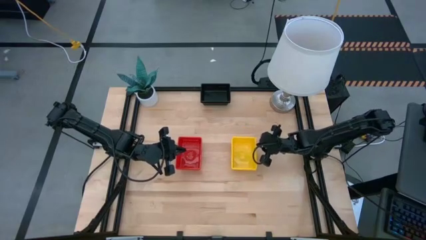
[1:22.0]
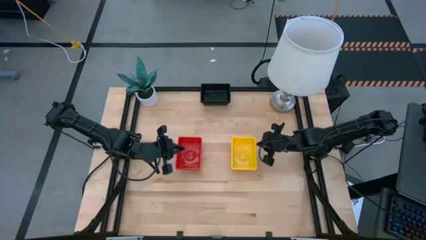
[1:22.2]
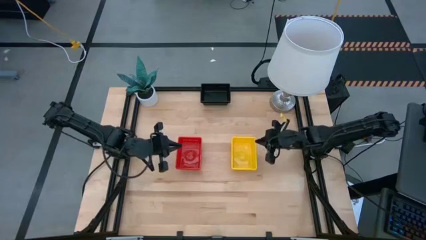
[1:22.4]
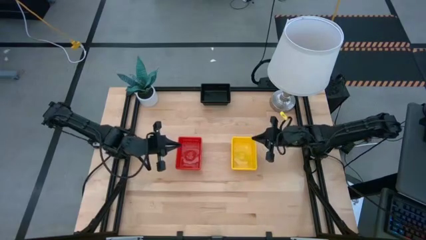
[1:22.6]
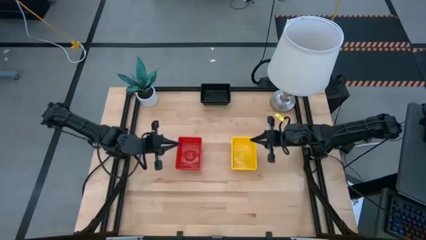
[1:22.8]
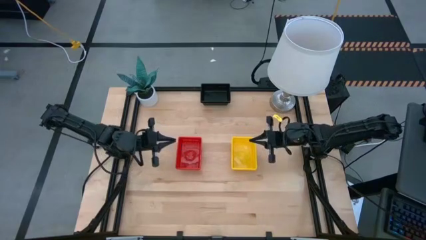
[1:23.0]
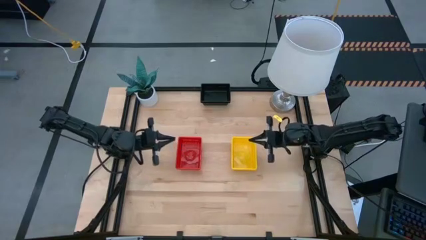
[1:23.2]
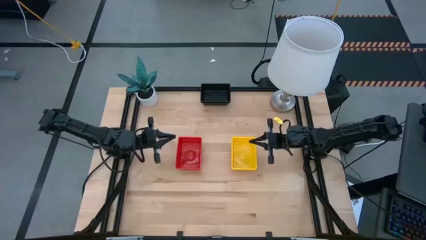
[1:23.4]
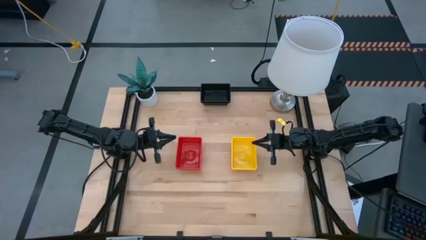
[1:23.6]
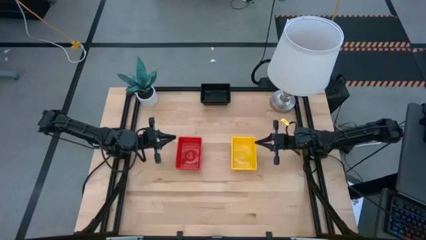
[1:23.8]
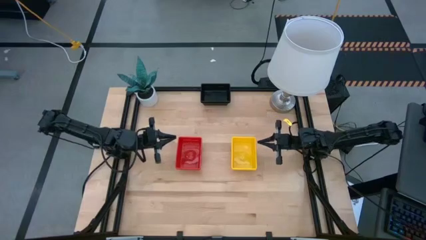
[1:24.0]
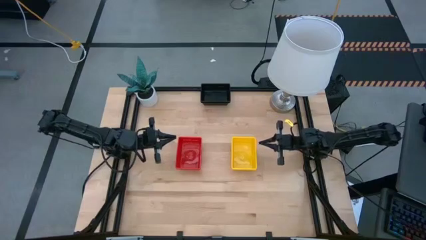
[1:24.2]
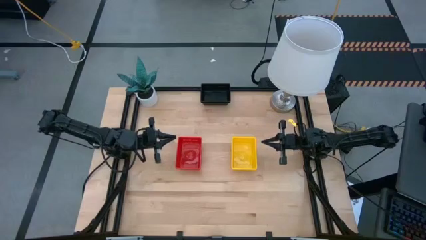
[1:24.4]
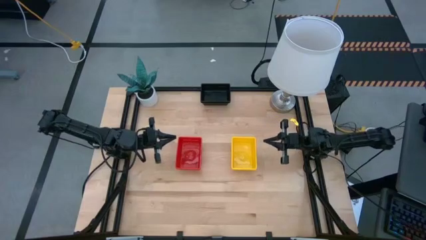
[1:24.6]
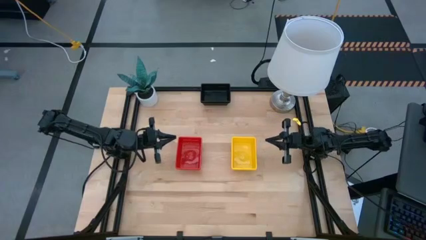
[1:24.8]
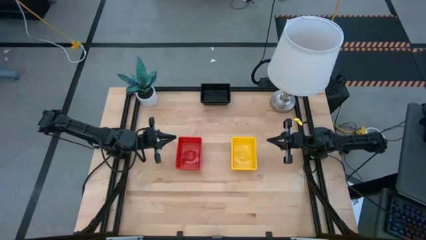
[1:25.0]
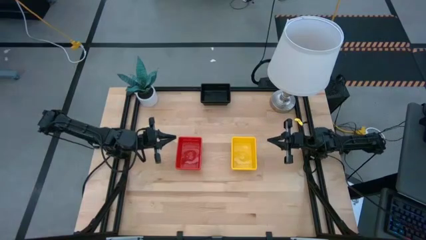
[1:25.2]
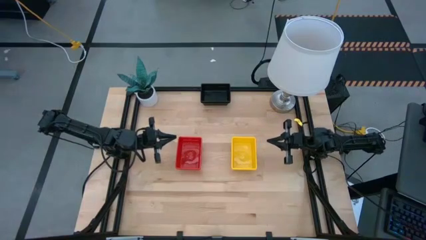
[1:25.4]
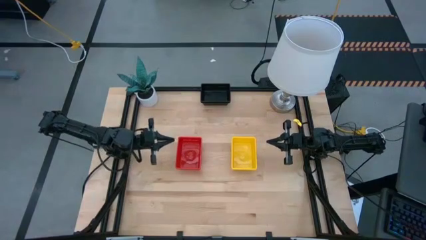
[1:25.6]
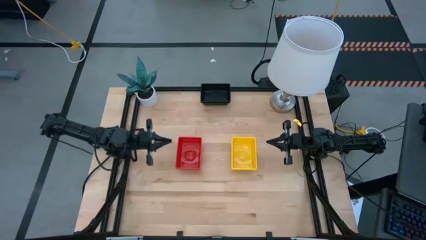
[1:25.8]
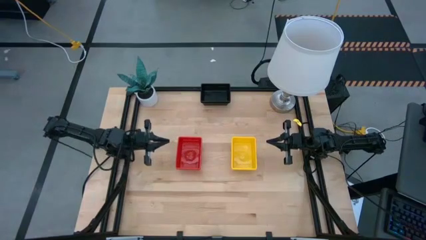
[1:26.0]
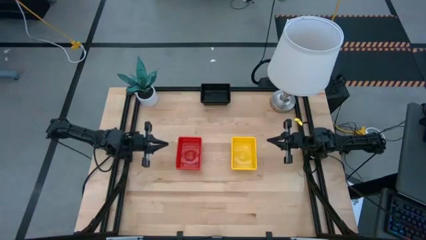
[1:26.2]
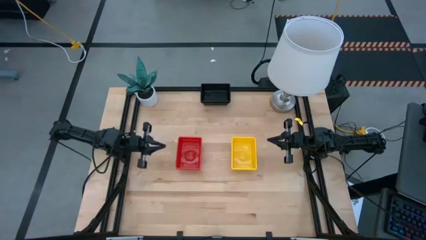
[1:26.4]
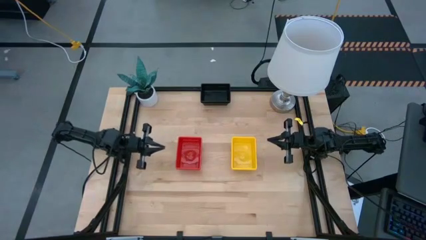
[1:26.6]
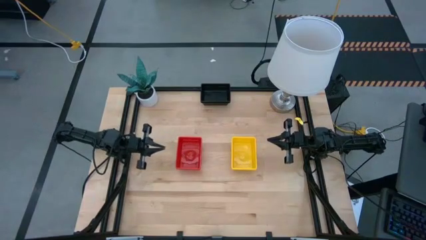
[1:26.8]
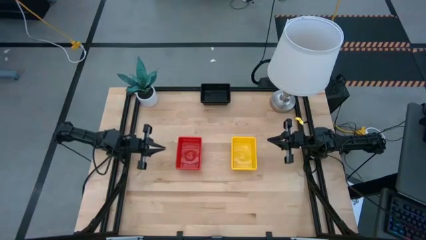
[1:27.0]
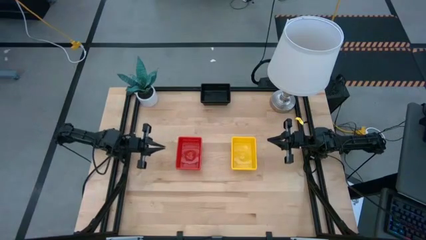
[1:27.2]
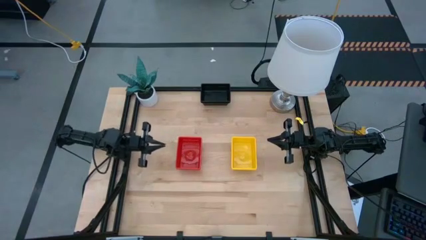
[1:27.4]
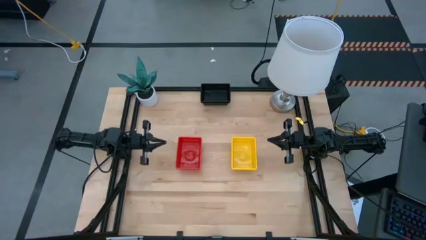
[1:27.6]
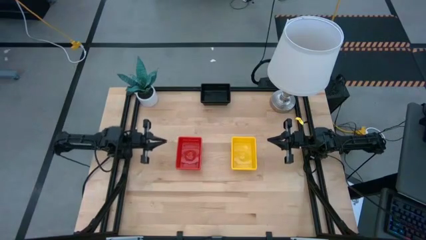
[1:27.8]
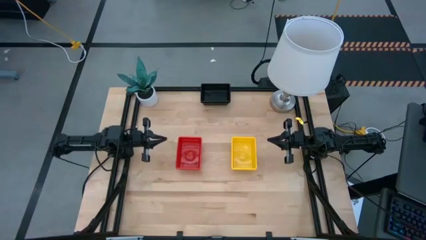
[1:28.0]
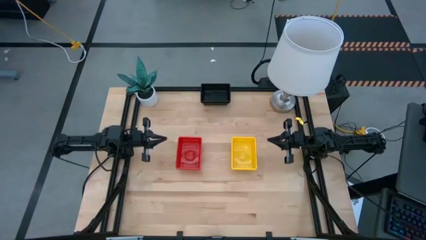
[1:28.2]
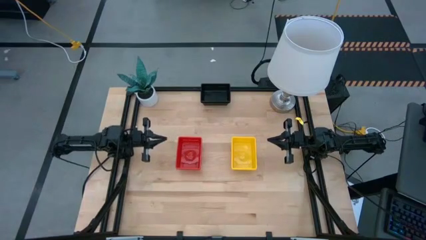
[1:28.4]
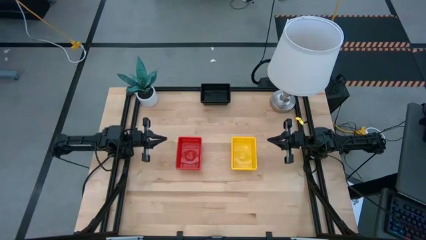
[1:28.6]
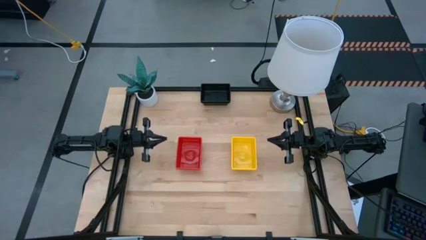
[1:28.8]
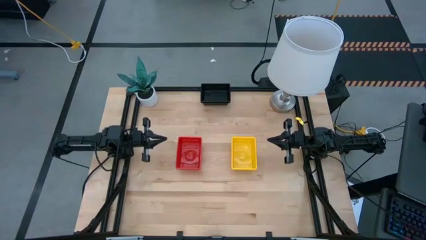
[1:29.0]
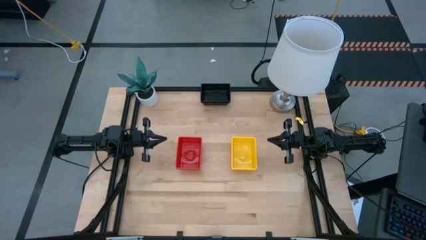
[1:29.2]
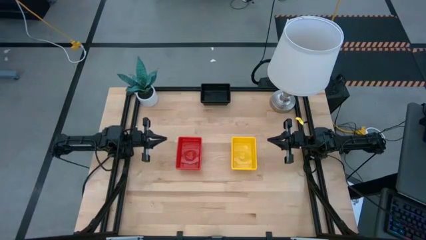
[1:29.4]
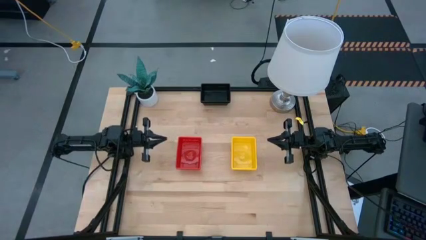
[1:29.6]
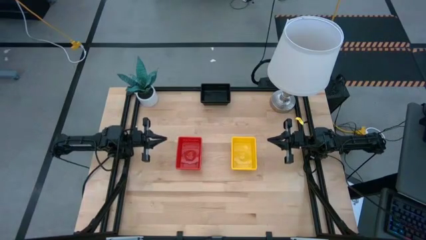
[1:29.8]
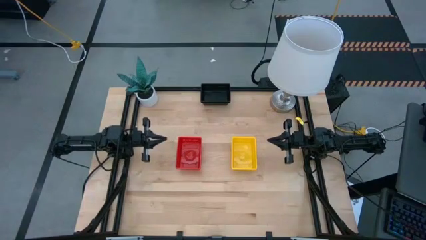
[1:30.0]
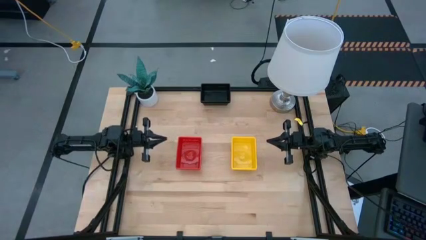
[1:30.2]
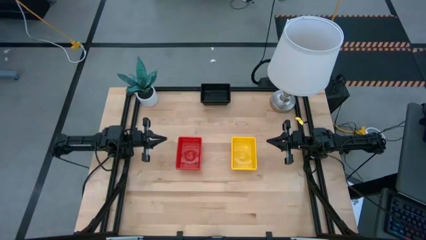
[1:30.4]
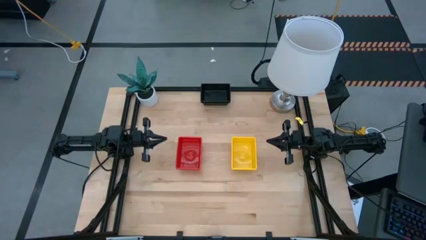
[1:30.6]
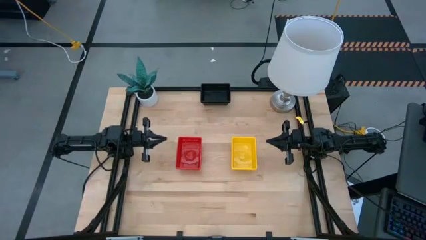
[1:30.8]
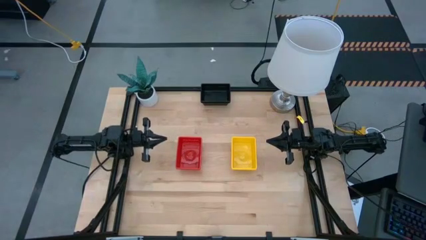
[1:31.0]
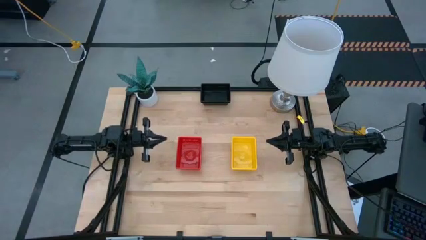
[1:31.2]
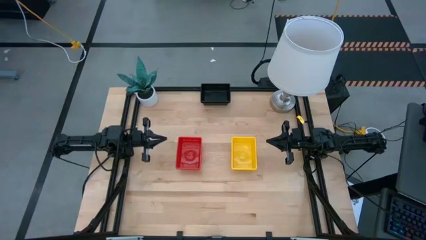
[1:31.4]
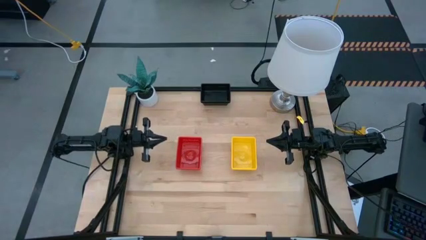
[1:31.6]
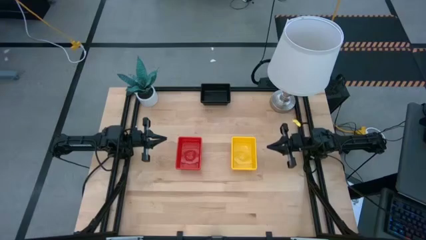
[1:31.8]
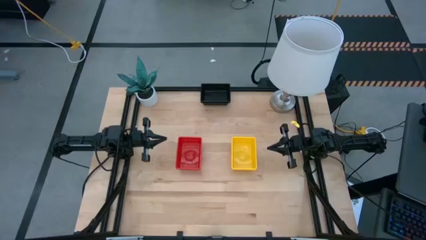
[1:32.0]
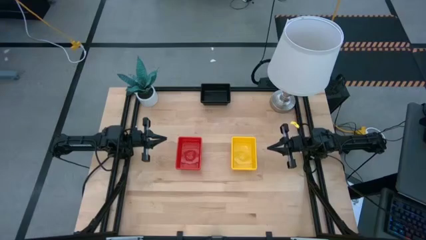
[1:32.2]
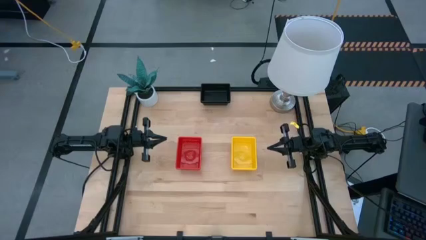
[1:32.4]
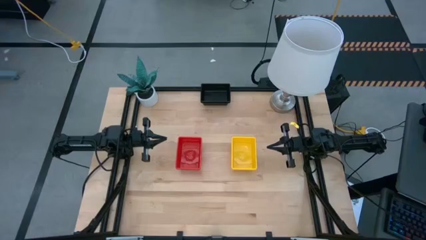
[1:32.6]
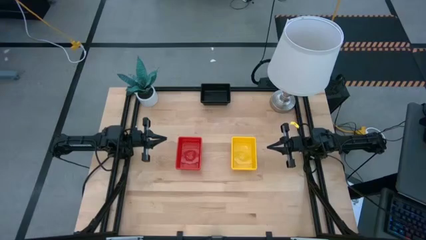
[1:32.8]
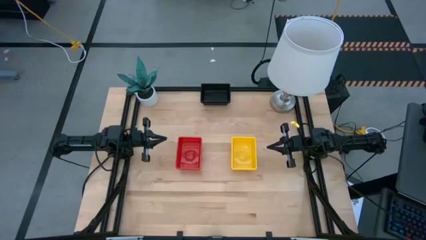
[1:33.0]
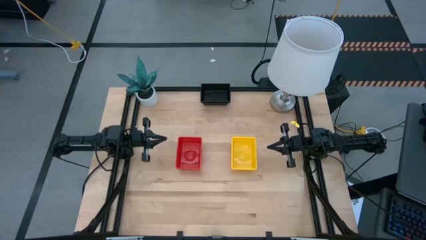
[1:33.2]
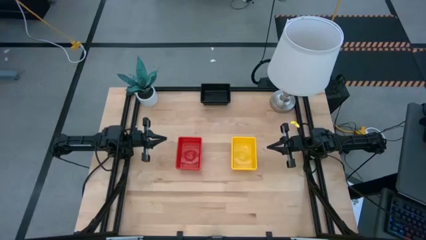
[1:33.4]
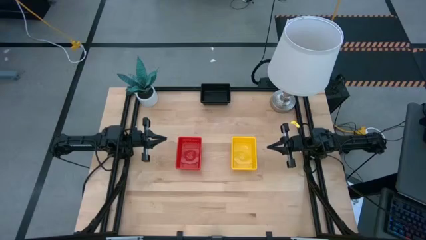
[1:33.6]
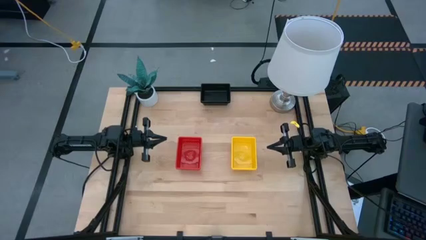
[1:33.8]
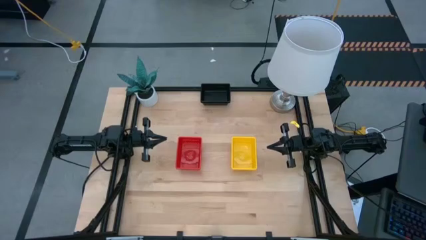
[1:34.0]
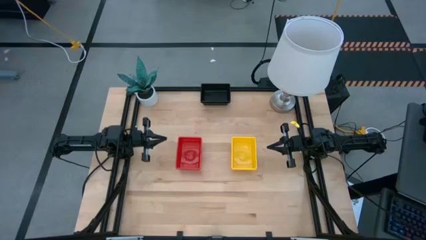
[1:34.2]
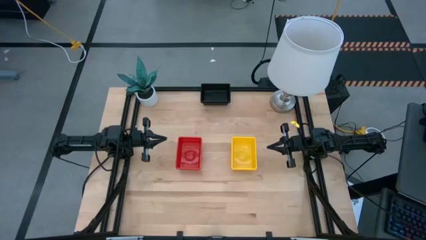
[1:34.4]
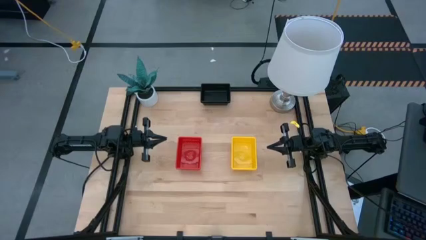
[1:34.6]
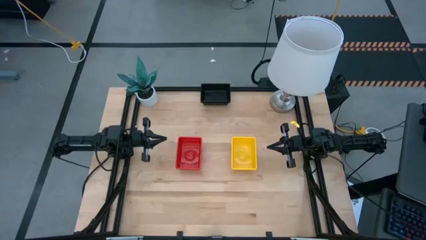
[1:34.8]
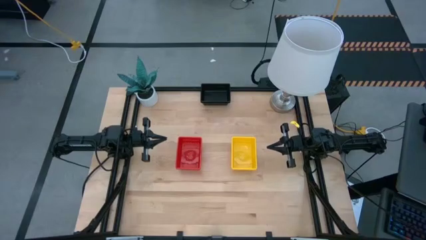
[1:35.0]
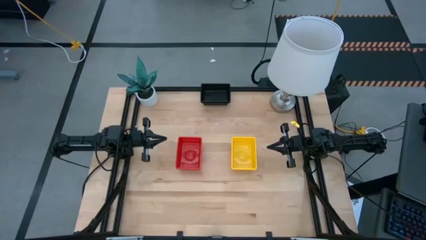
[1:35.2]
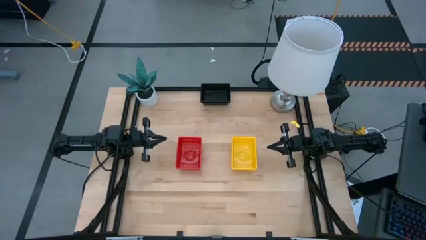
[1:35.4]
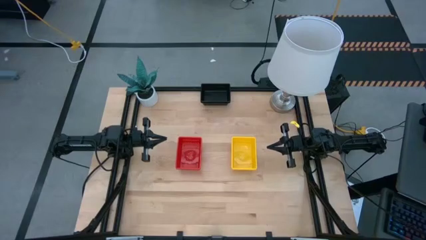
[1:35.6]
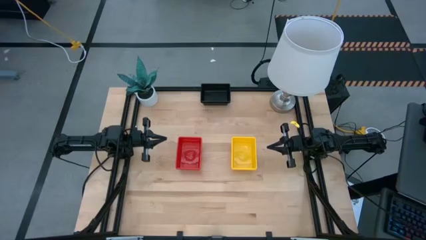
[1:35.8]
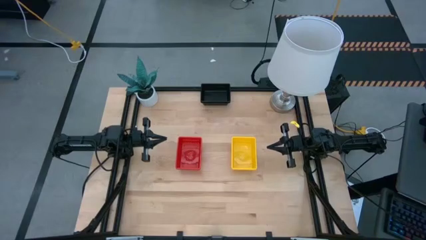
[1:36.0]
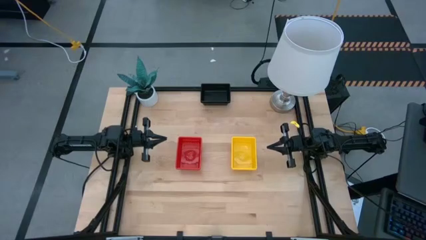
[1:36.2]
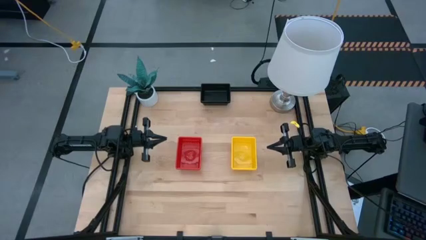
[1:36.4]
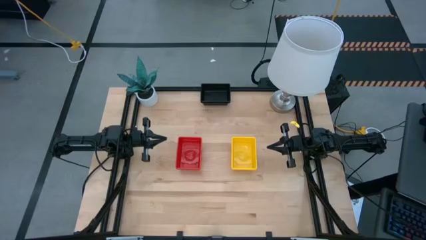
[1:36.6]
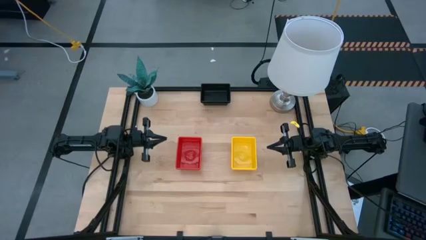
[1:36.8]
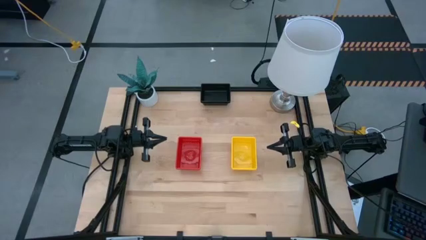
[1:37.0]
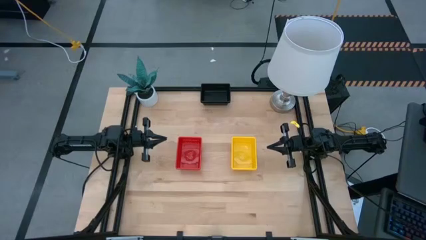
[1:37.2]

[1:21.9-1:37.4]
Return to Home Position
